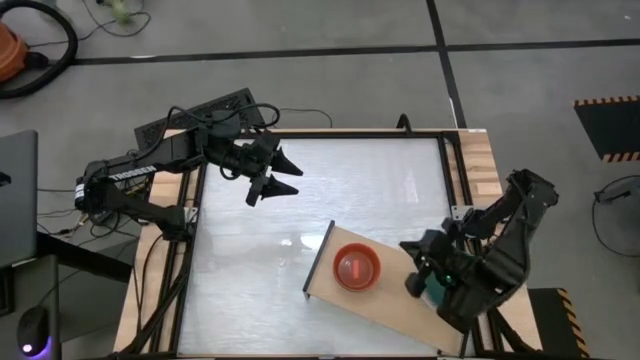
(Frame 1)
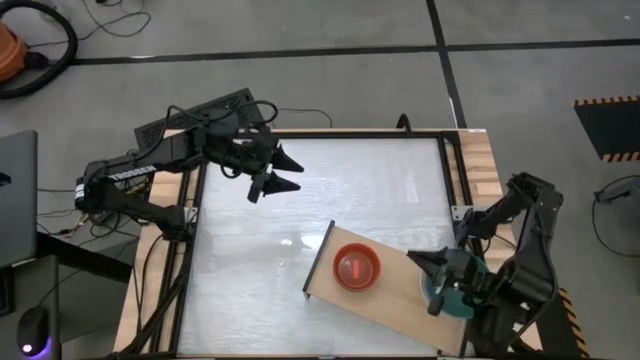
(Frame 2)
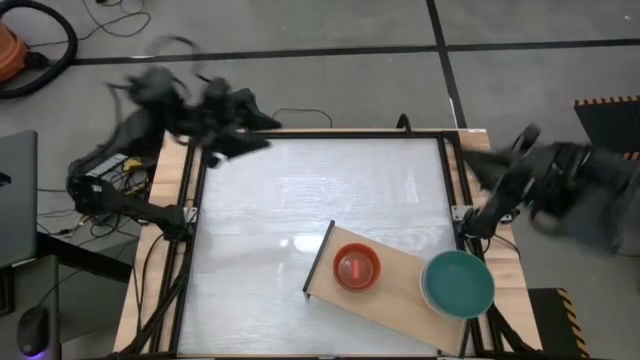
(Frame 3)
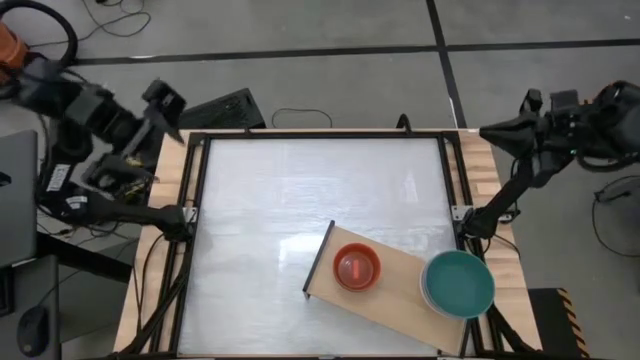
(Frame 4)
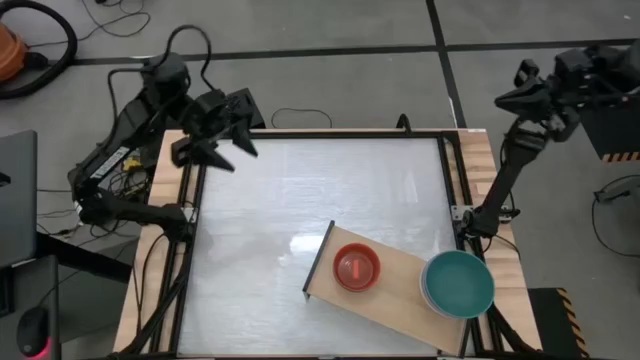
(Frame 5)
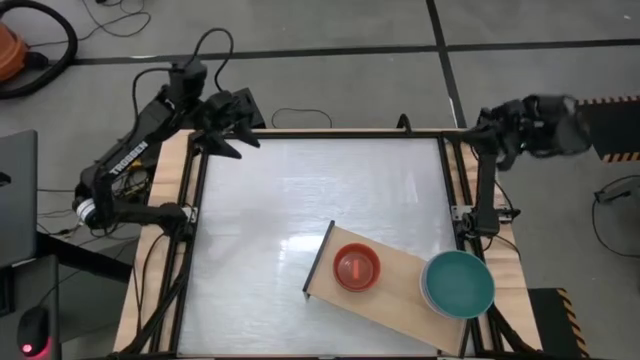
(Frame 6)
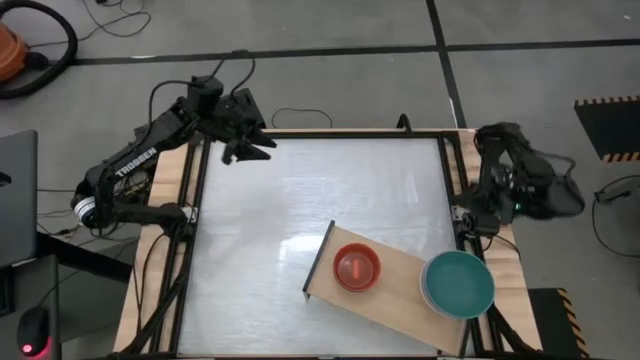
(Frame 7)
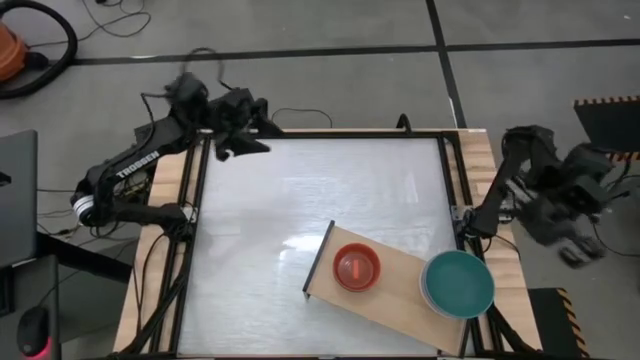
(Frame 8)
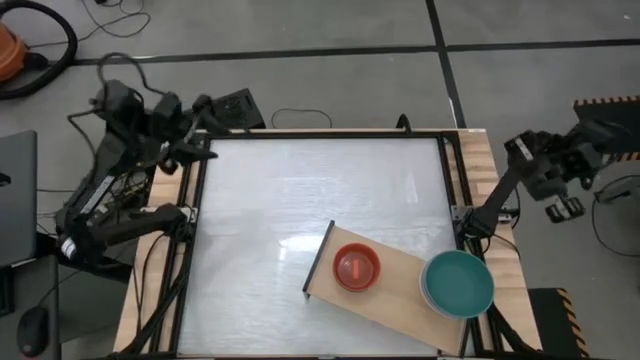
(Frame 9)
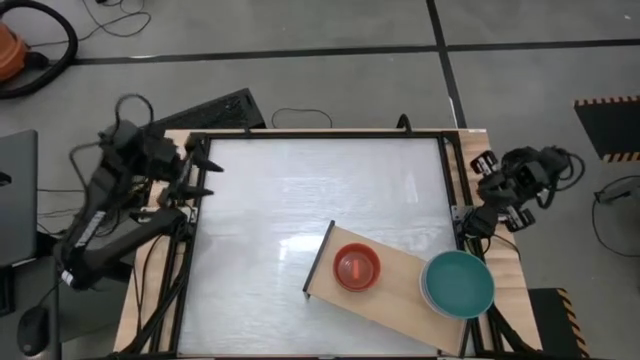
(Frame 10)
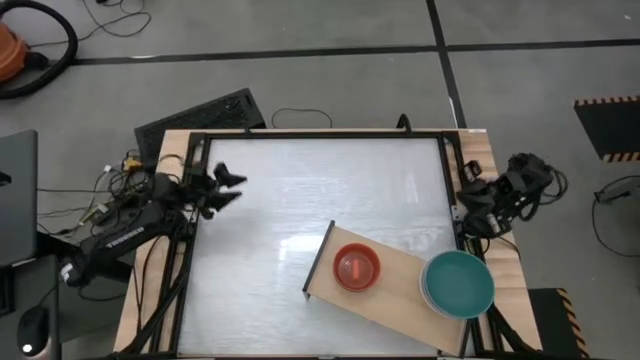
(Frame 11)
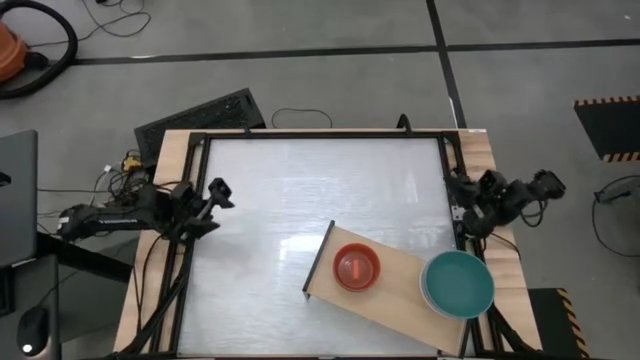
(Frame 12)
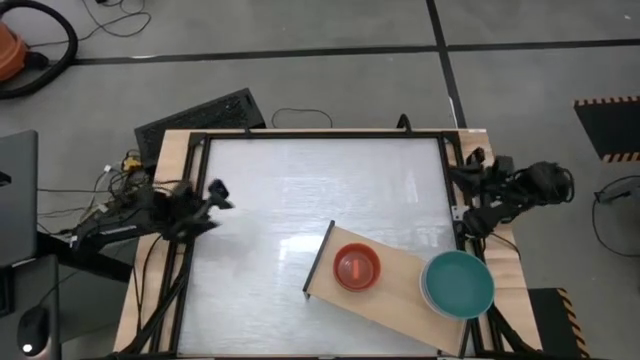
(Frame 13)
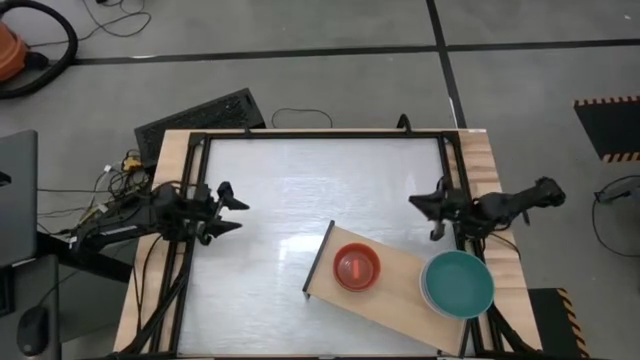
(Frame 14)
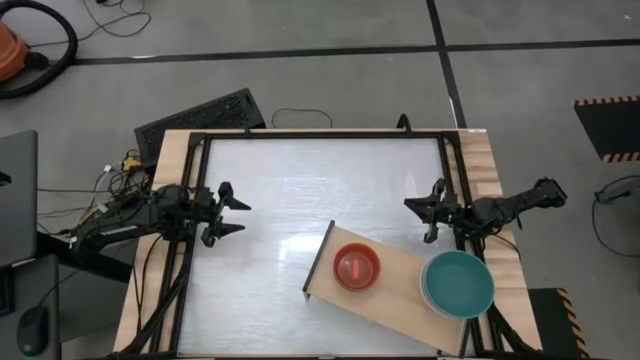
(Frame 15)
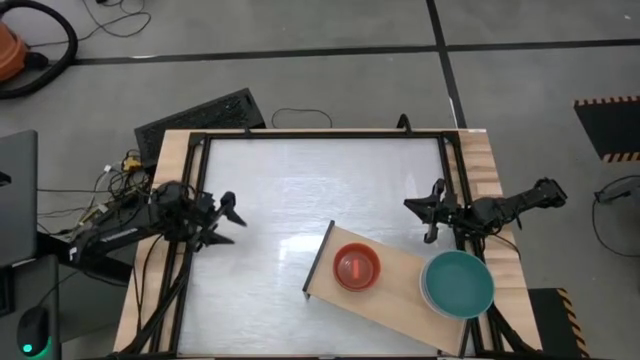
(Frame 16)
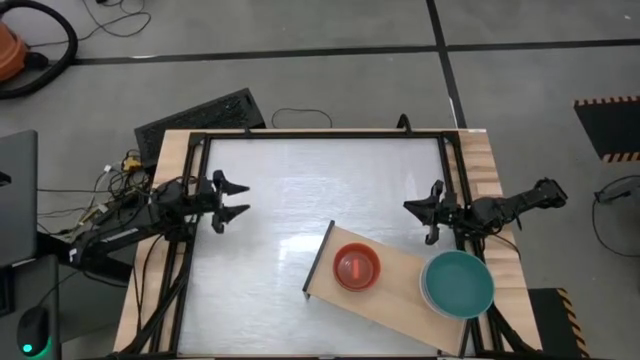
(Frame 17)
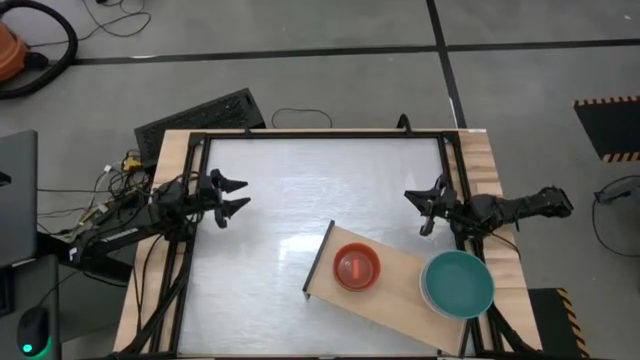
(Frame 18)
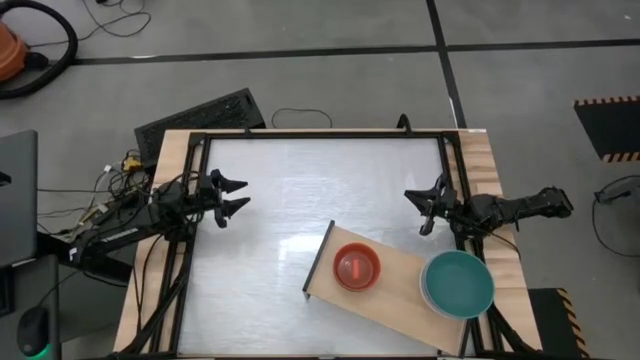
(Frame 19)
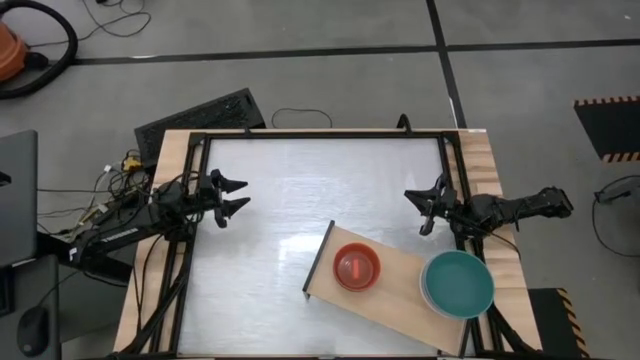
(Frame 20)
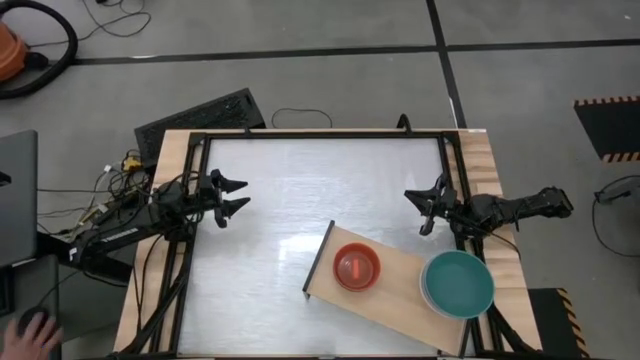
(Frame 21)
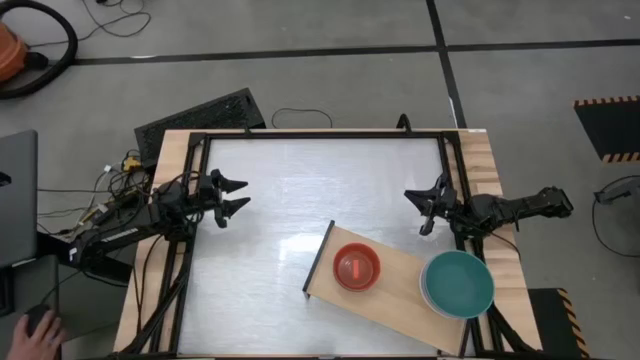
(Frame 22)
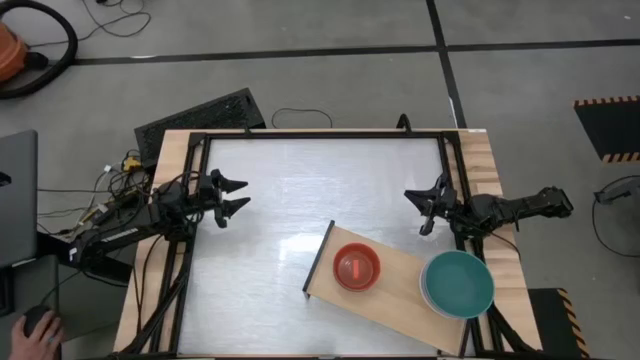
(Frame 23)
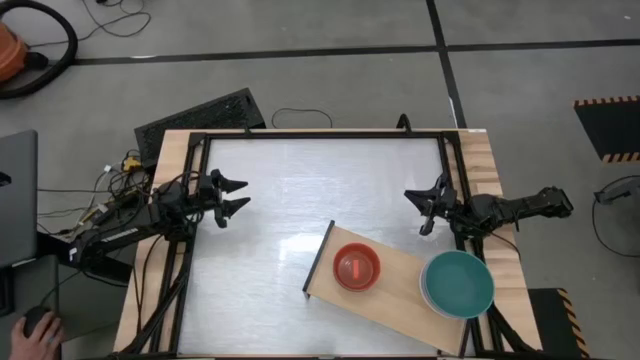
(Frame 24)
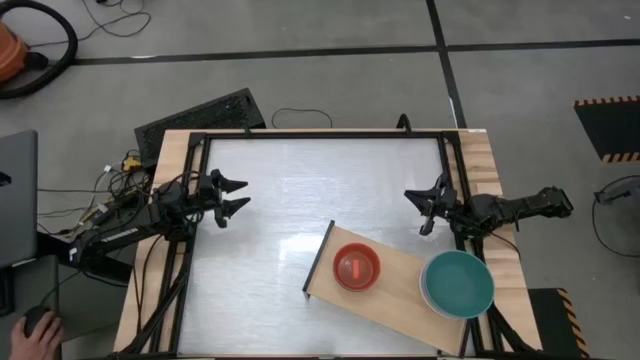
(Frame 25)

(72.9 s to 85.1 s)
Task: Place and stack bowls onto a shelf
Return to Home Position

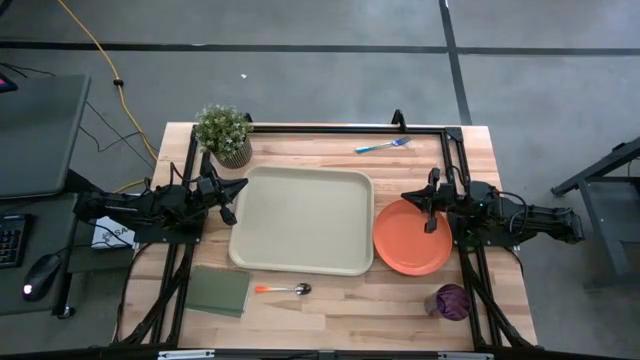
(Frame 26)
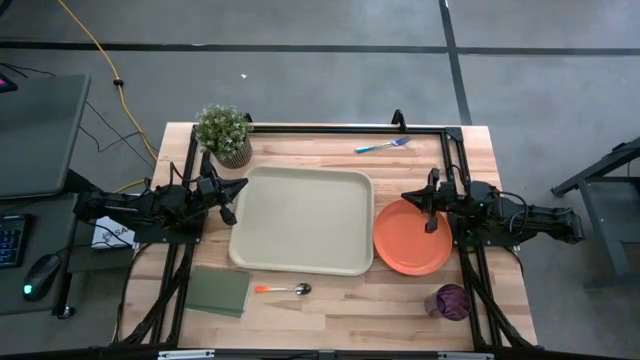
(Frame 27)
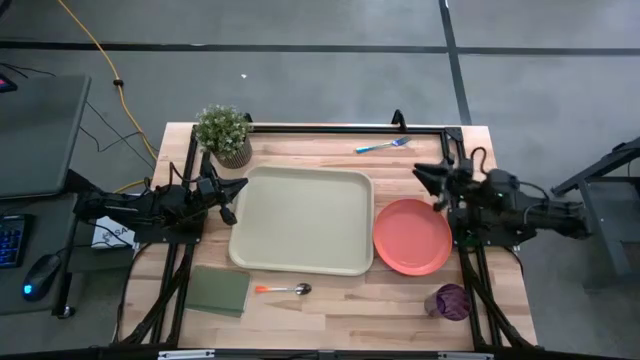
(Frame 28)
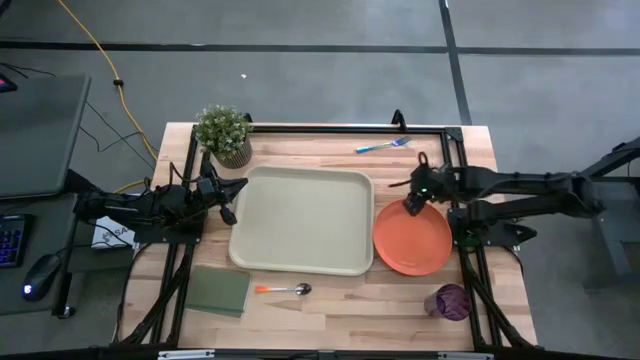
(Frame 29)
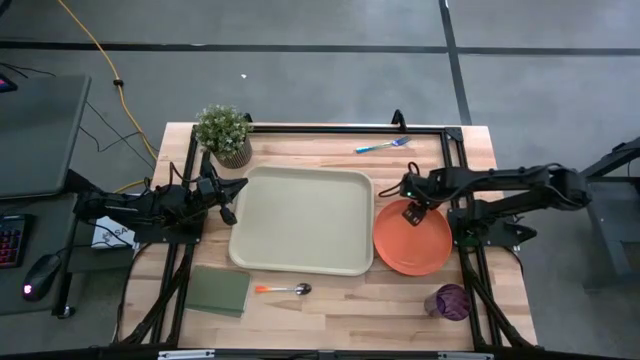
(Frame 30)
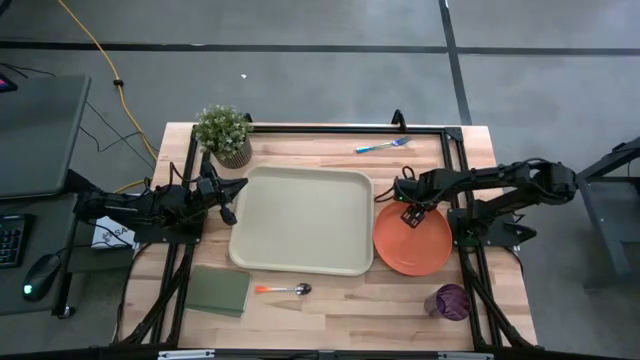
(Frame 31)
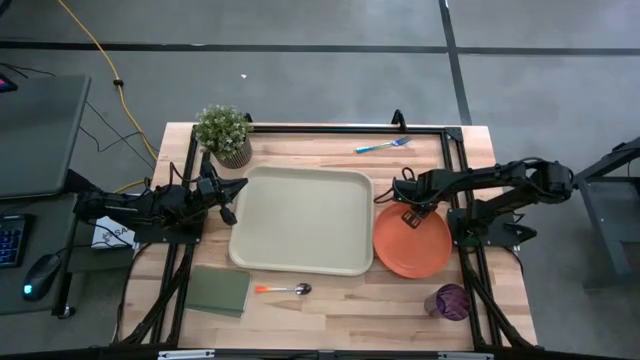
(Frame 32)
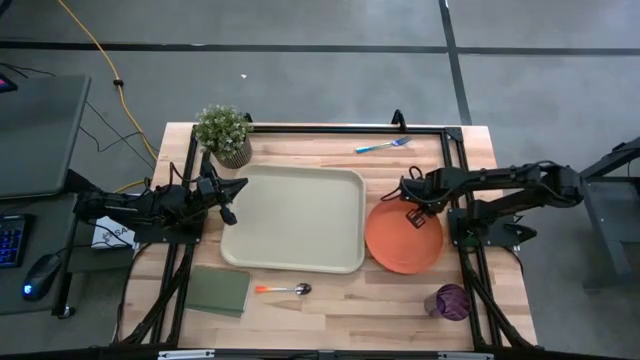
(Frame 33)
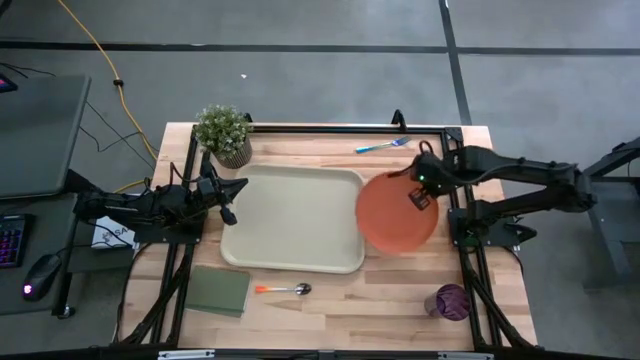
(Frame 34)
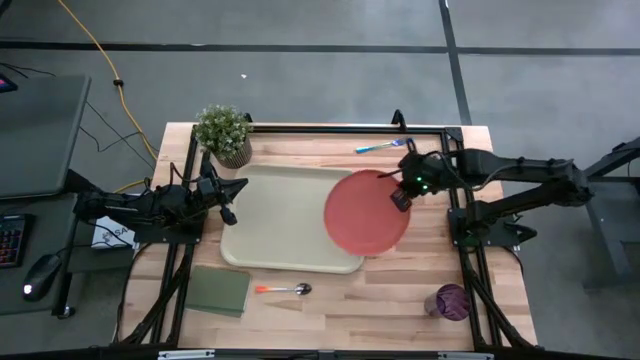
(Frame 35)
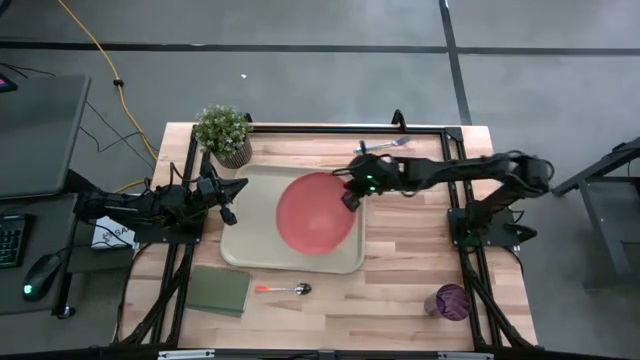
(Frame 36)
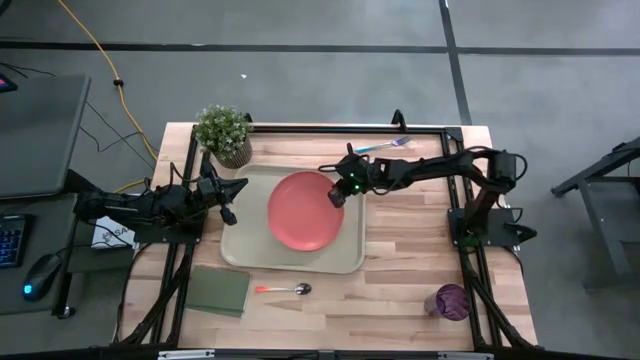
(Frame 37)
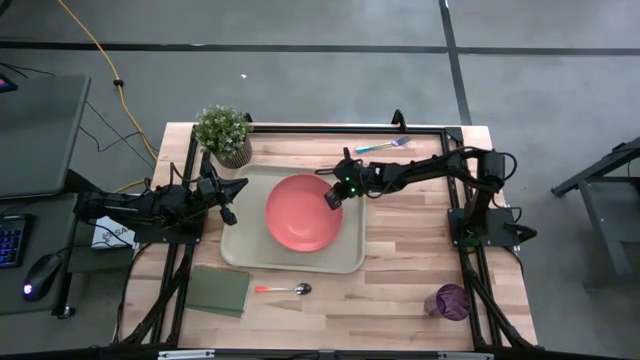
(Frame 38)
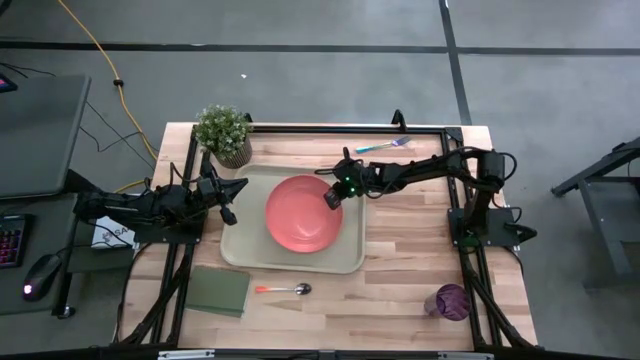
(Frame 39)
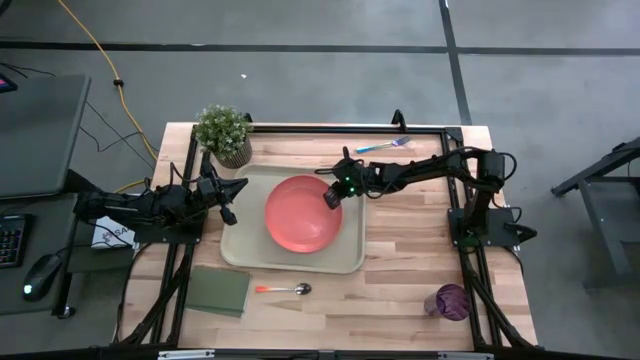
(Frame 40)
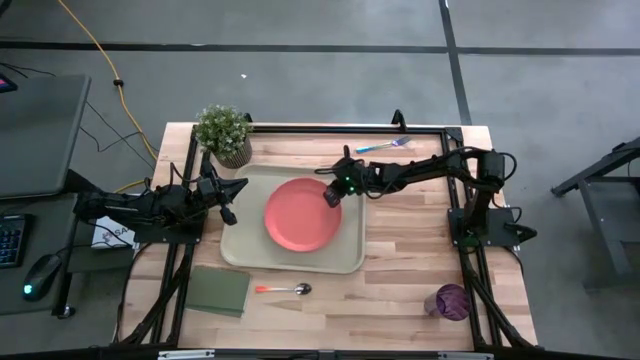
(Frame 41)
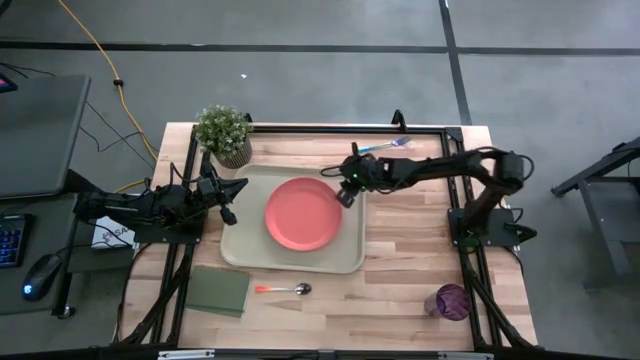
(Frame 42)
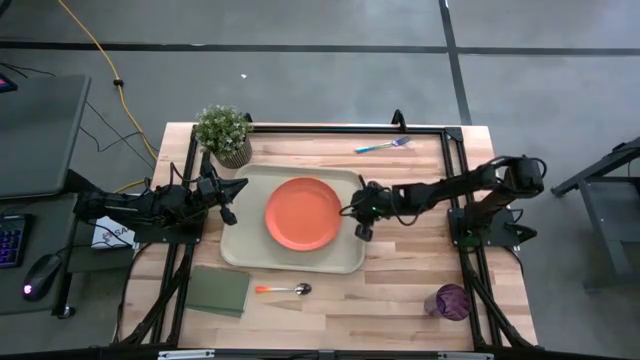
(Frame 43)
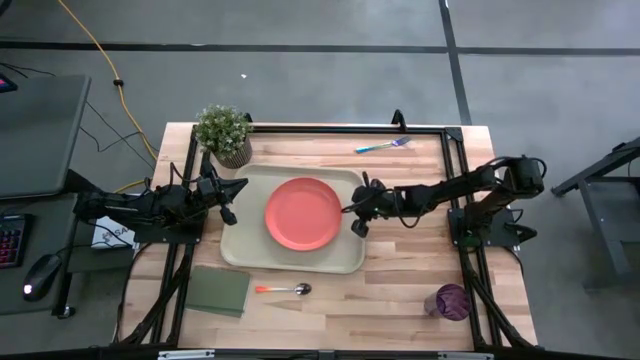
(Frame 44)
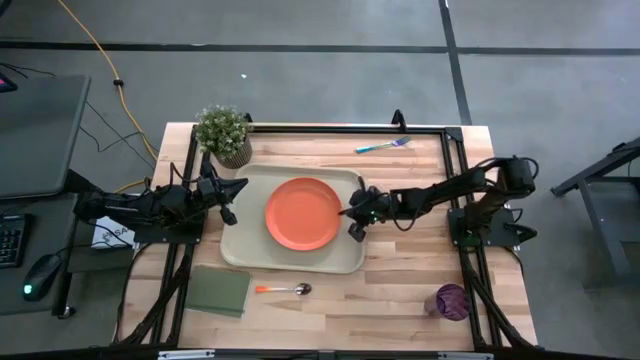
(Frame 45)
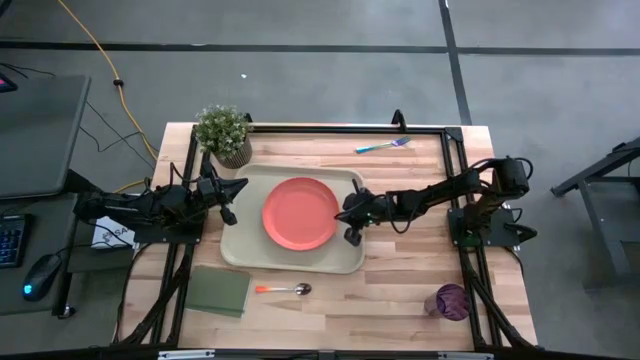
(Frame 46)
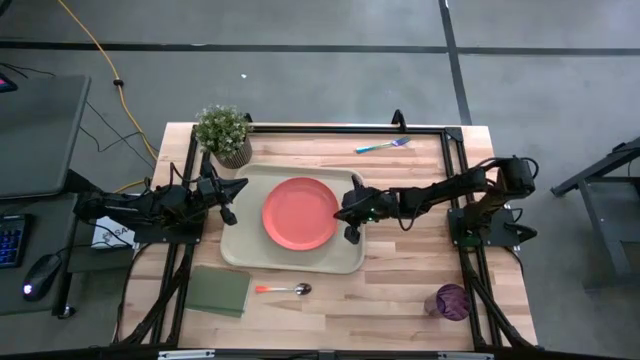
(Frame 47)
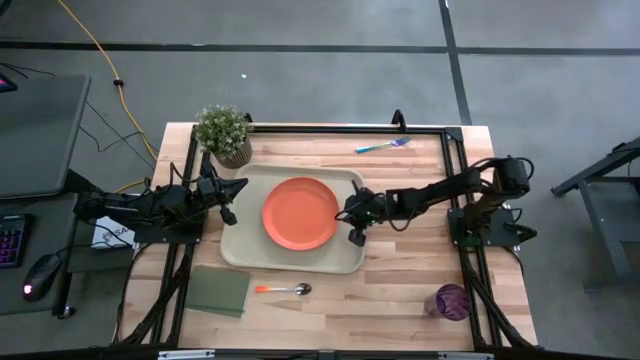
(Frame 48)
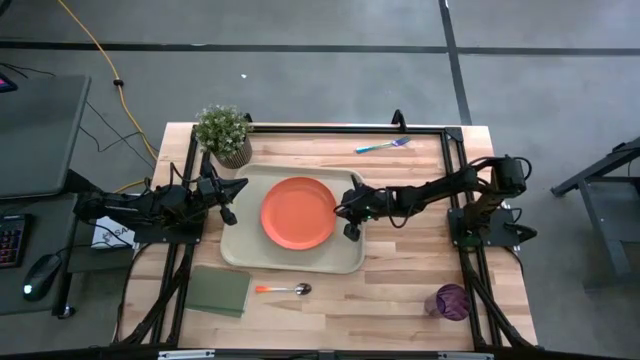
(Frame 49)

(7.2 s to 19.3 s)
Task: Pick and place plate/cup/fork/spoon on tray
Put the orange plate on the gray tray
